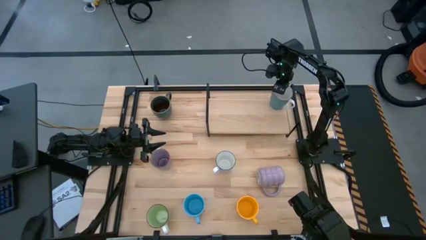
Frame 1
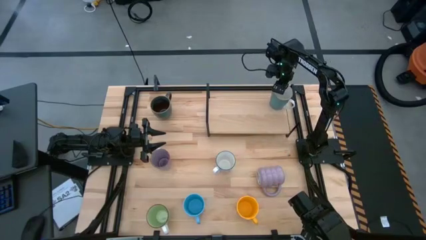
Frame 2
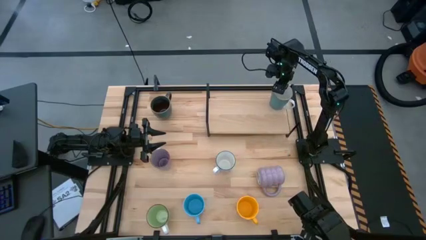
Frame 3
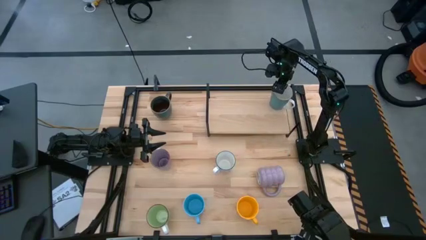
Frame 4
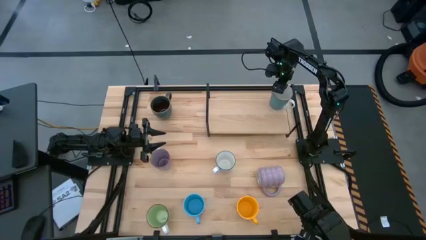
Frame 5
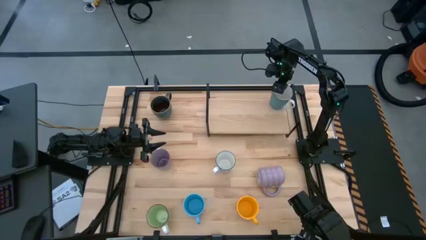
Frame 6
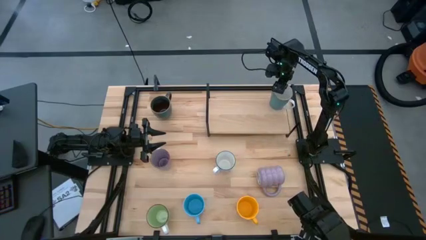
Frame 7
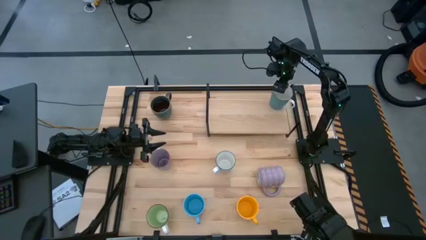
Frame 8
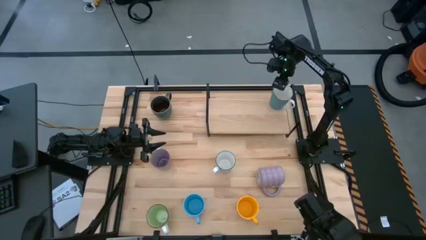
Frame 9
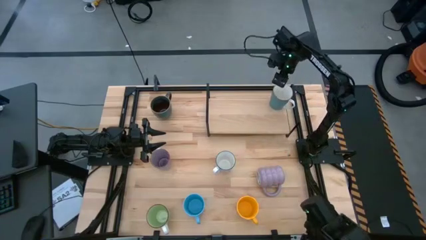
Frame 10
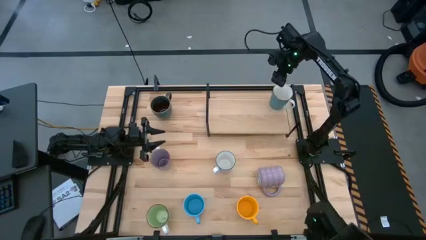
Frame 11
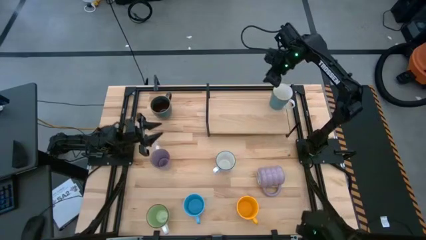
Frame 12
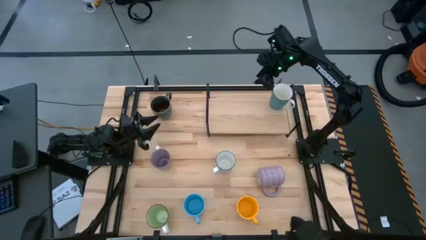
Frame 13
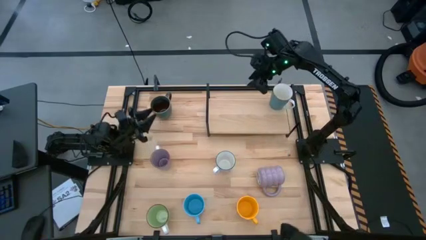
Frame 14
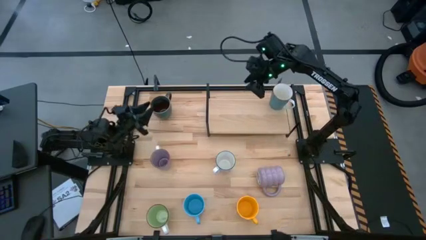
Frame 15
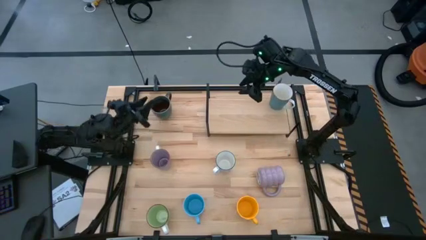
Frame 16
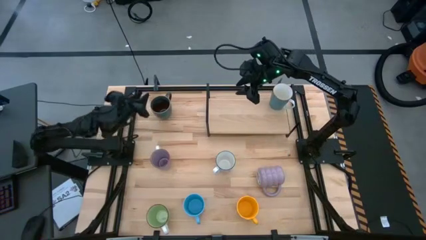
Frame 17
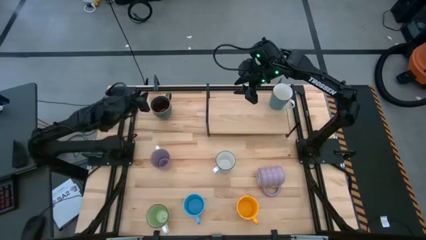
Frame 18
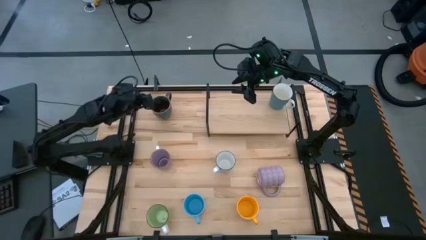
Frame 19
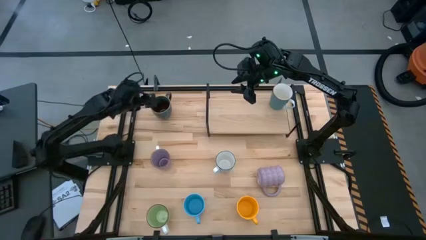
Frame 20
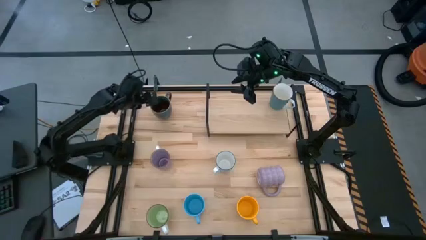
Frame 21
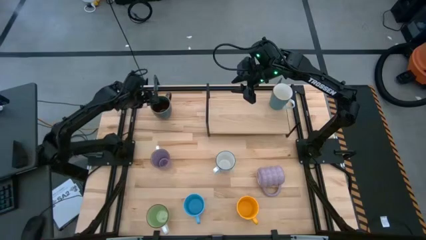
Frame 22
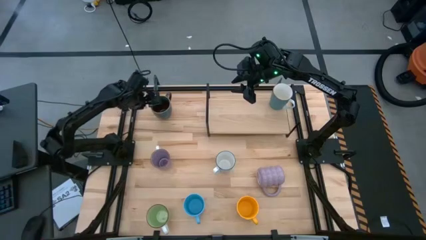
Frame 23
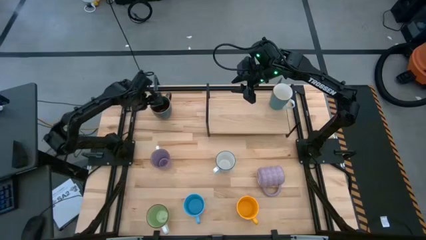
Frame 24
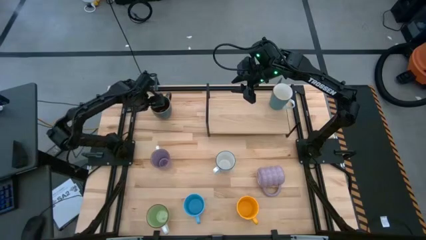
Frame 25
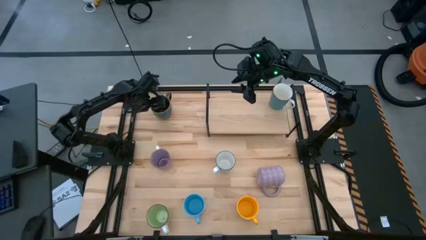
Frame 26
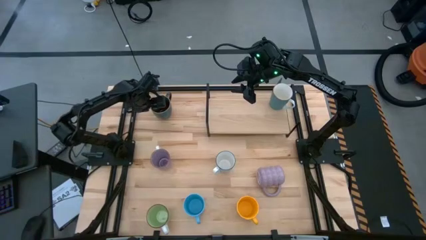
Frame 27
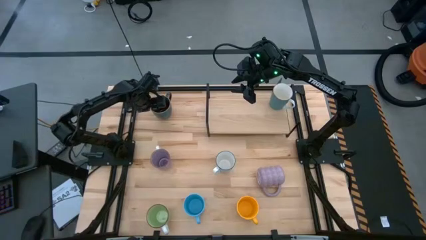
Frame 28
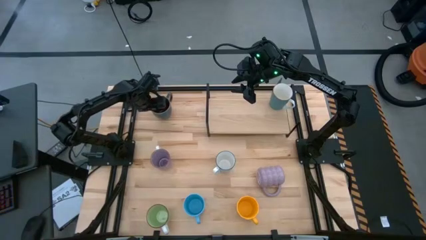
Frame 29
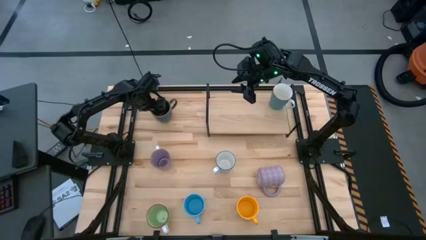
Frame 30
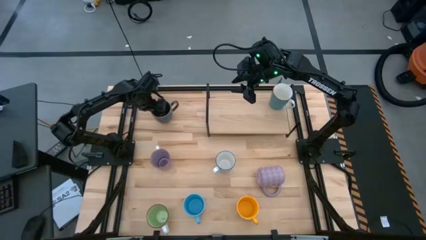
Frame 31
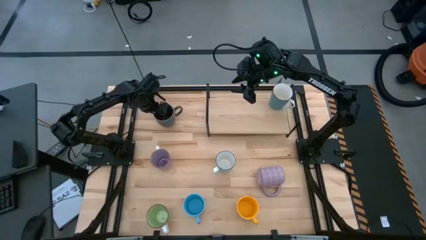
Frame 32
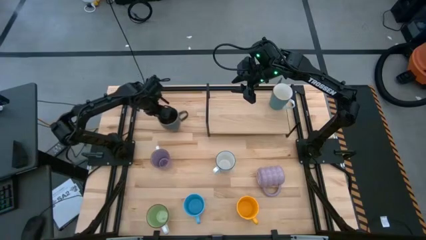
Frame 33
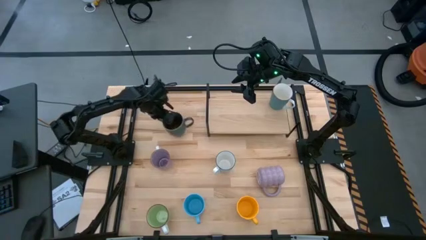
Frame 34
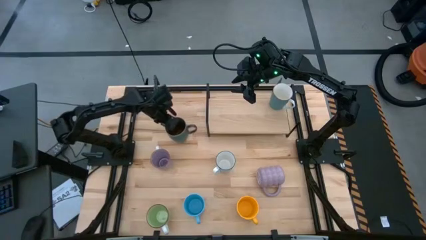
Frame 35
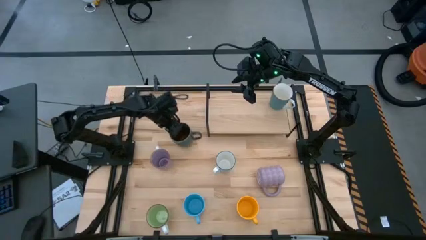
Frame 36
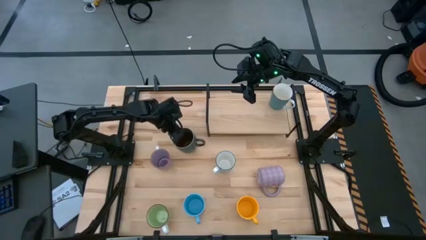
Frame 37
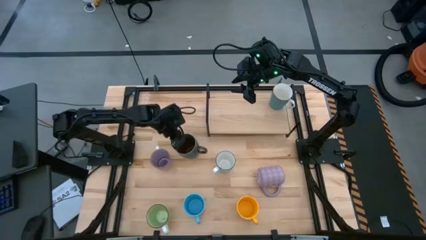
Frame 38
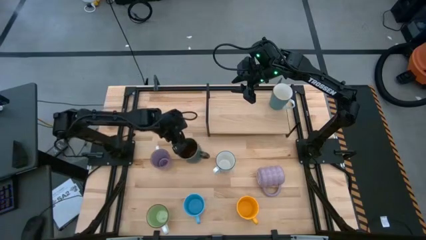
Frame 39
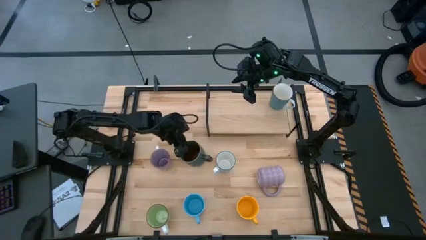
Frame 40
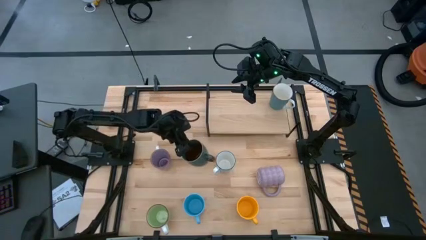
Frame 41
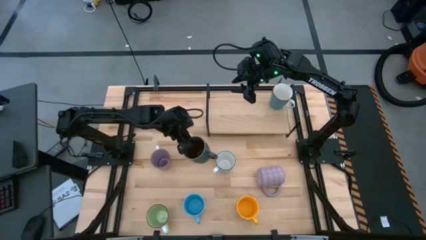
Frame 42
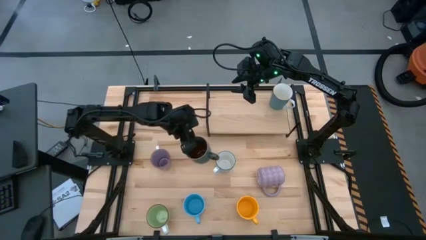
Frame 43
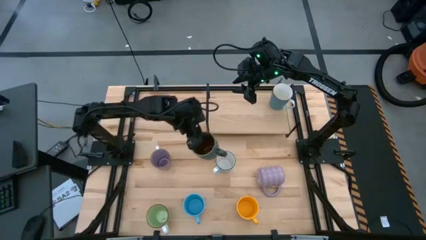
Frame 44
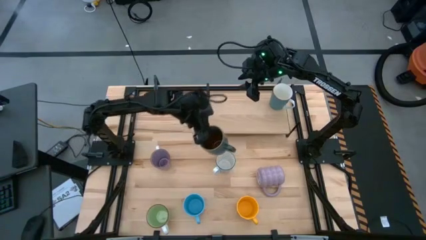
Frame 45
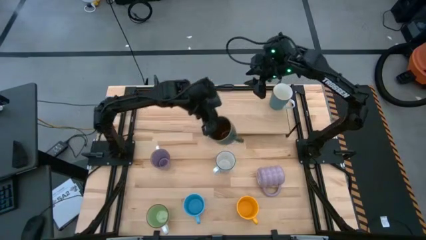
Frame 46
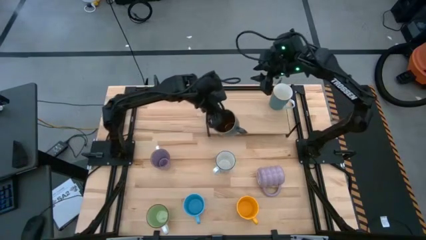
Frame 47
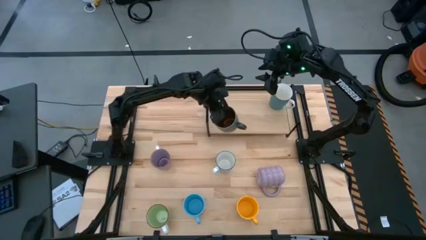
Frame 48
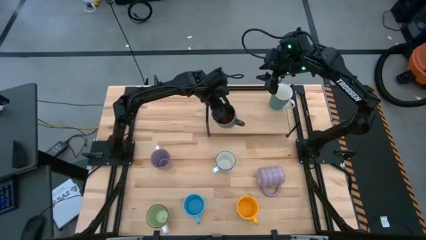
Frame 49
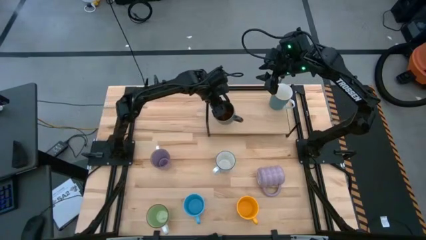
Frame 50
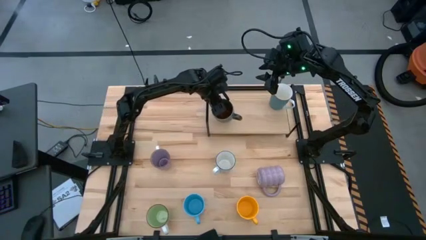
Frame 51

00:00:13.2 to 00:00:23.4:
Task: Place coffee mugs
Put the blue patterned mug on the shelf

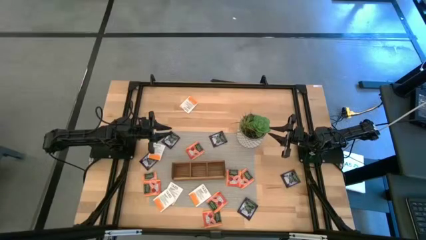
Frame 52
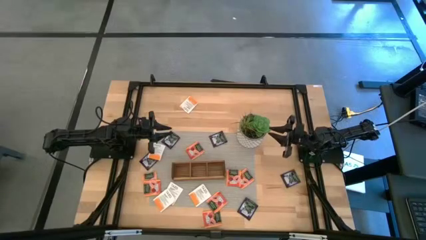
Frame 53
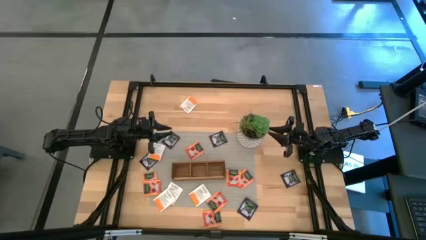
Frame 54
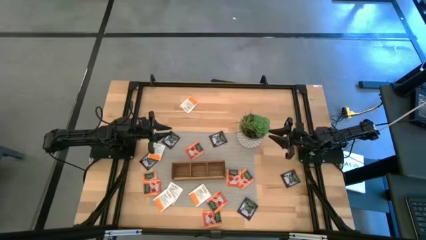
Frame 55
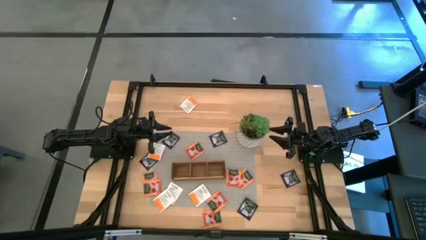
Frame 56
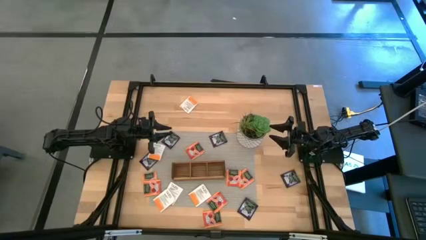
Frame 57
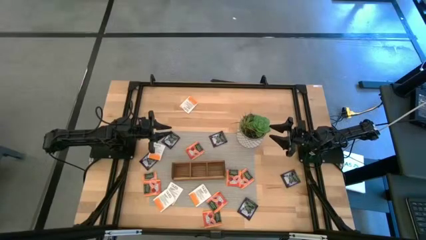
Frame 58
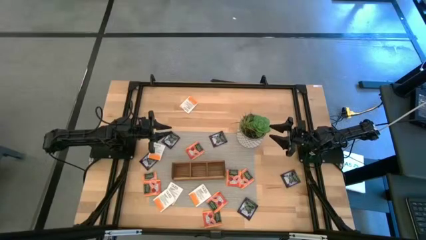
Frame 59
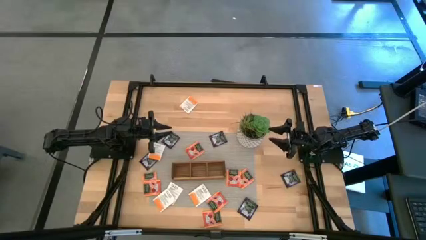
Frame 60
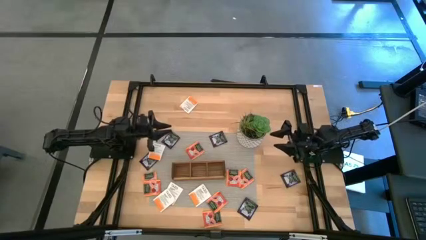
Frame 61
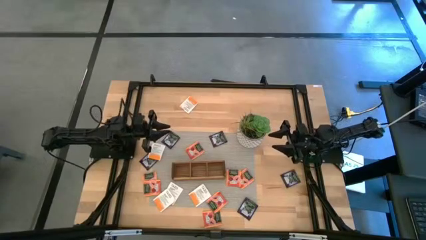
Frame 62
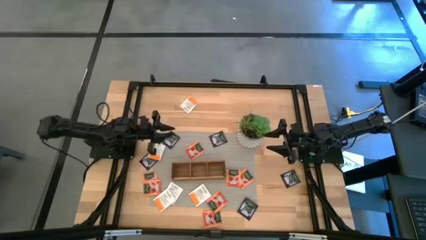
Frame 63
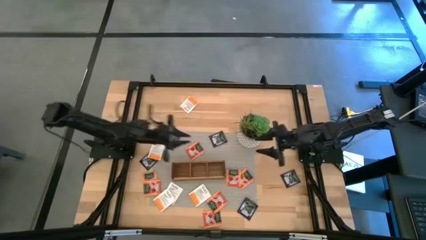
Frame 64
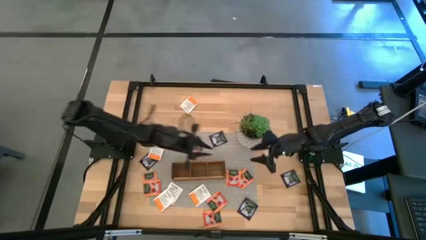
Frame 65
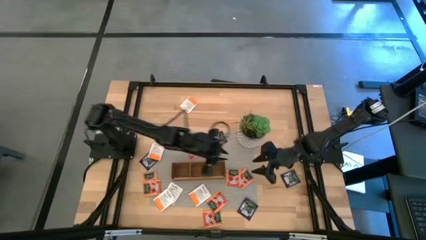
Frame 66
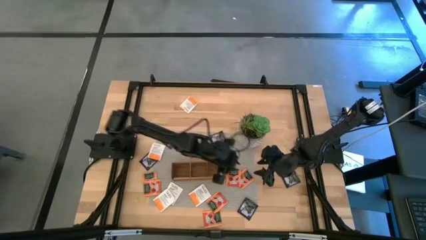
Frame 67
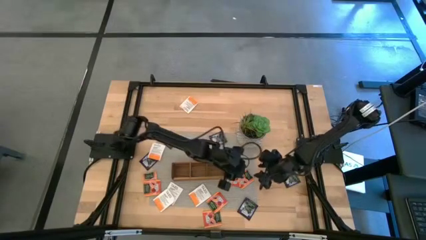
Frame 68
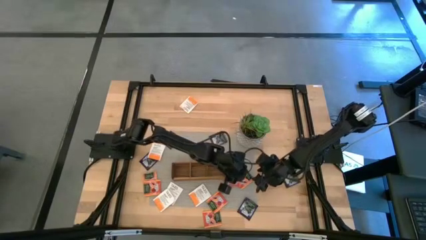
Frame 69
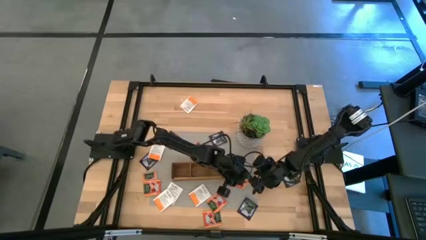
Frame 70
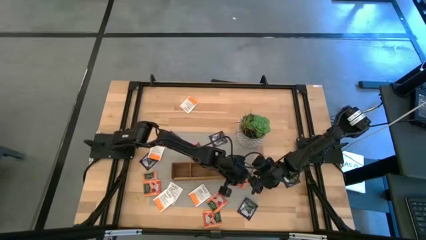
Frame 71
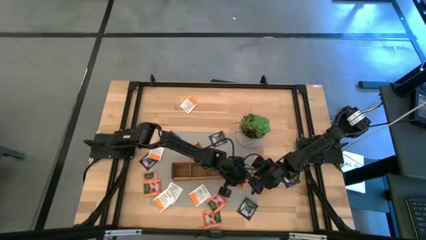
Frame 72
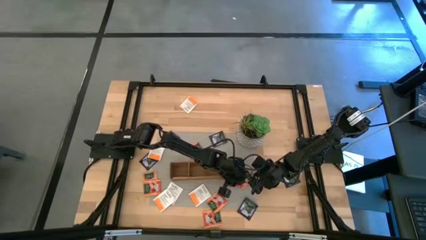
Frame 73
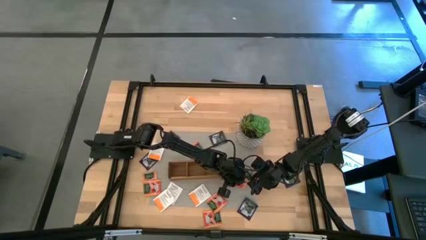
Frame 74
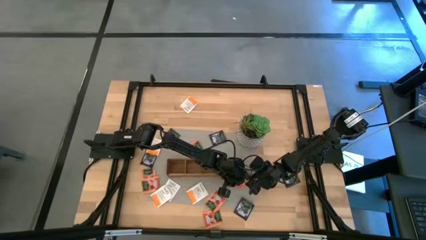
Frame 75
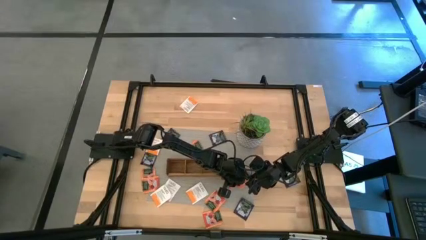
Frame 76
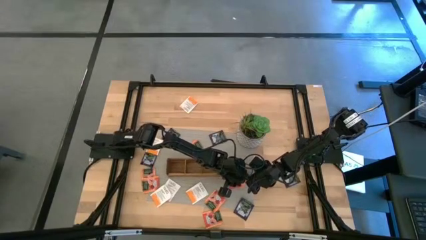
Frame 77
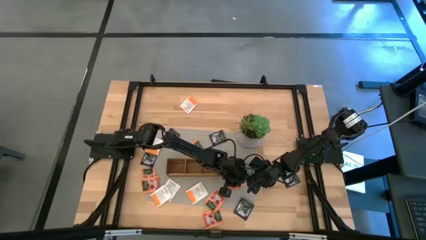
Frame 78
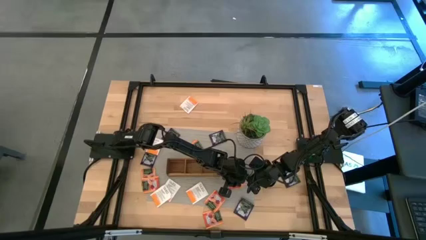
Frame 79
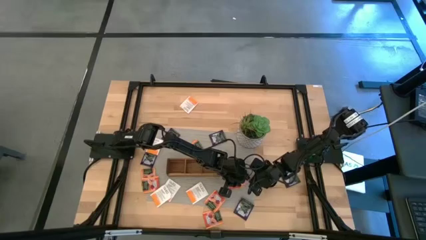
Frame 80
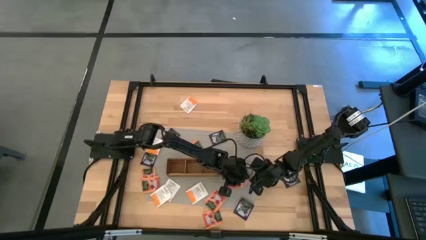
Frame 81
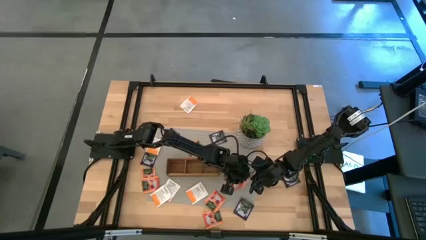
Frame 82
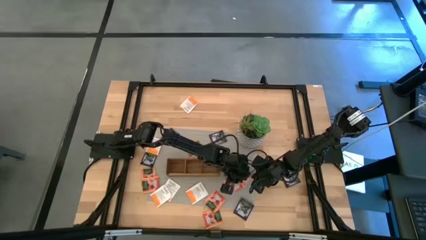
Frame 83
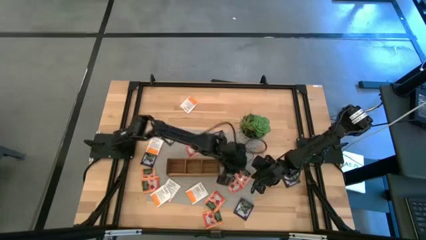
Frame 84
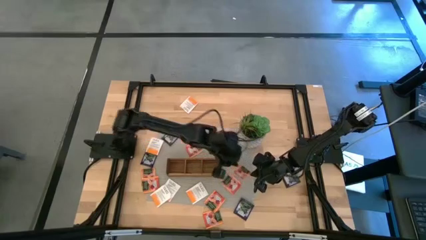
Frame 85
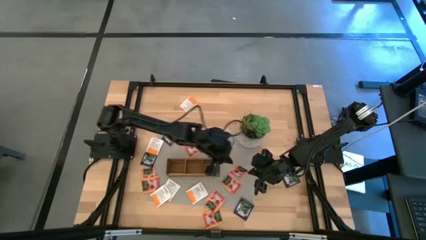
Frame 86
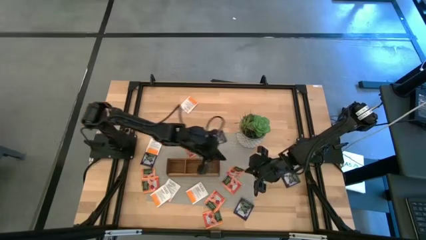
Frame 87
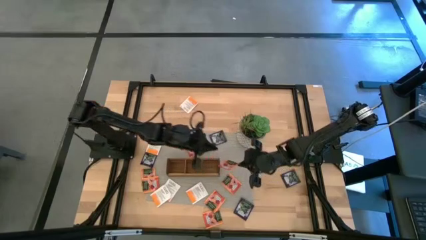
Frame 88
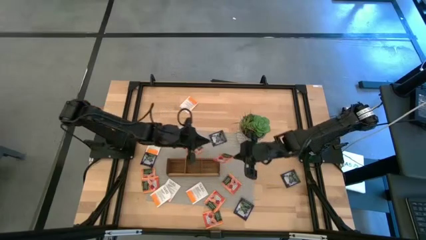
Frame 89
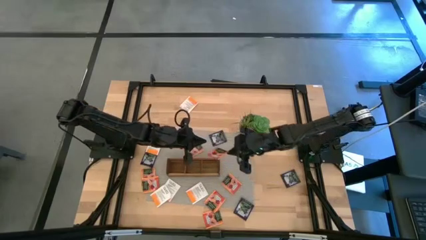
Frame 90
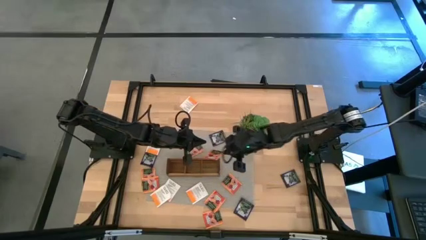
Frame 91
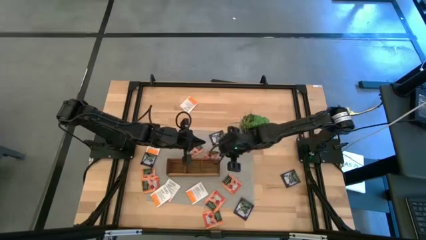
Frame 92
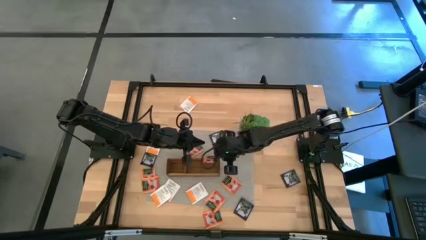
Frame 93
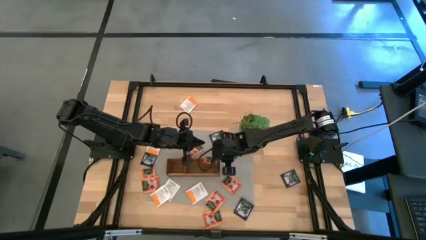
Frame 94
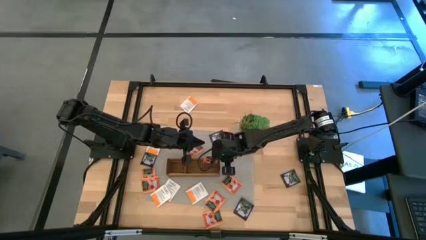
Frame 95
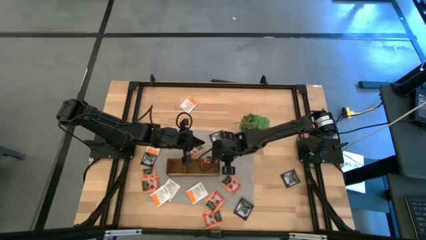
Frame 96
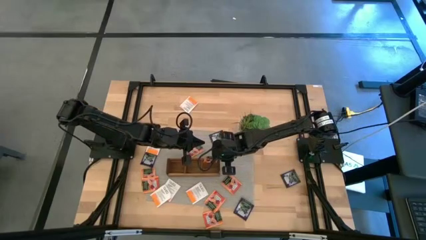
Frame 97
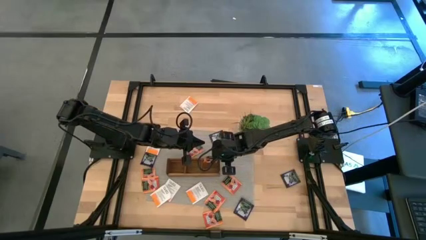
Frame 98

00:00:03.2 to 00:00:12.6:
Task: Pick & Place Tea
Put the orange tea bag into the right section of the wooden organizer
